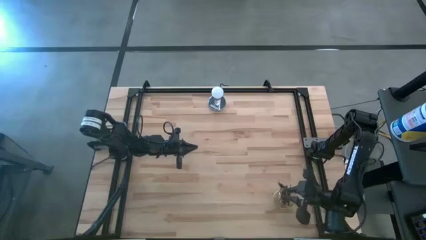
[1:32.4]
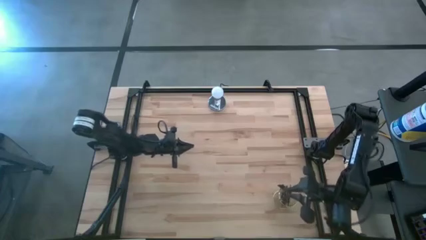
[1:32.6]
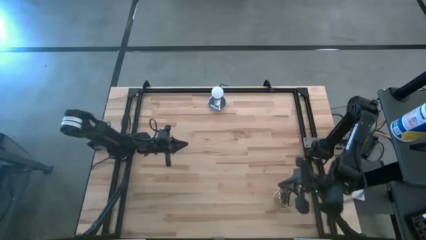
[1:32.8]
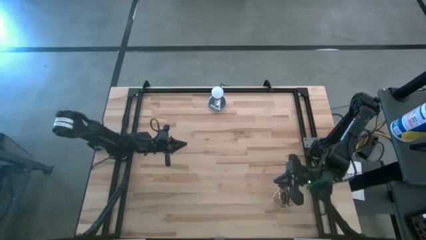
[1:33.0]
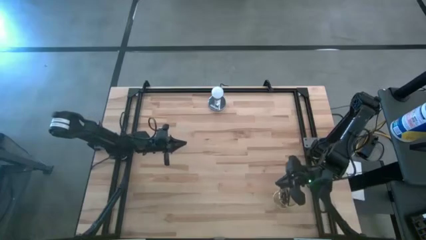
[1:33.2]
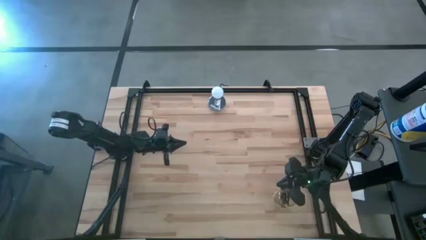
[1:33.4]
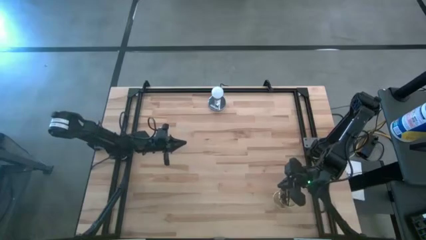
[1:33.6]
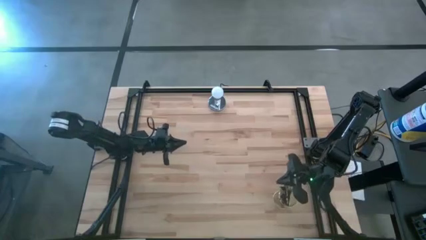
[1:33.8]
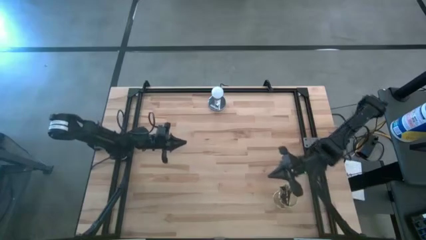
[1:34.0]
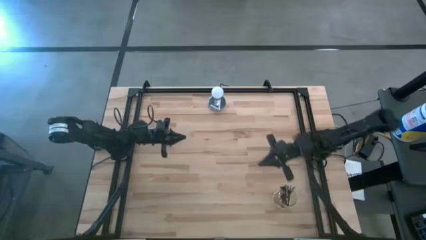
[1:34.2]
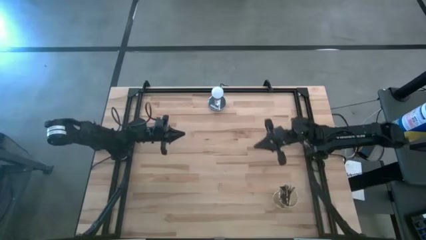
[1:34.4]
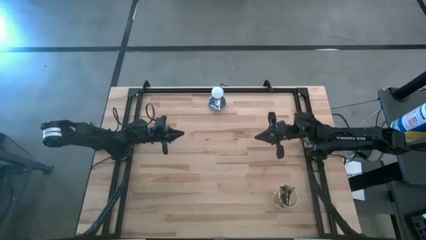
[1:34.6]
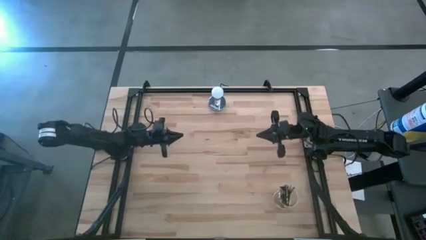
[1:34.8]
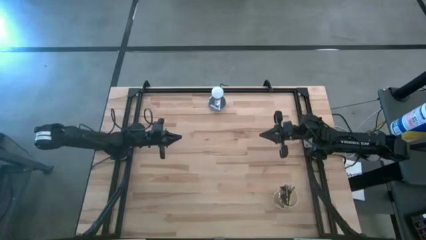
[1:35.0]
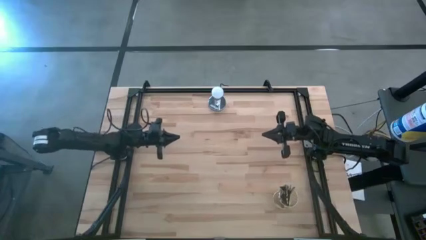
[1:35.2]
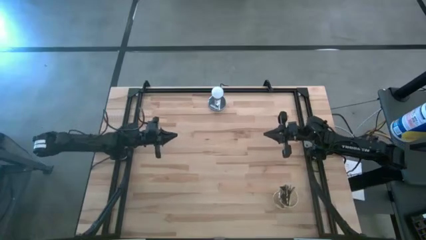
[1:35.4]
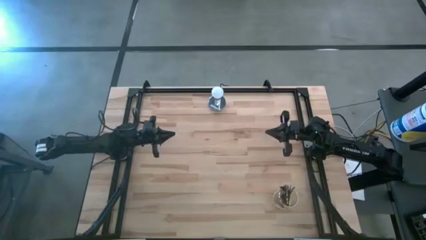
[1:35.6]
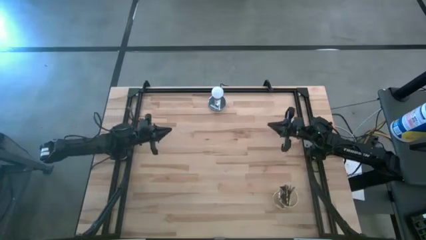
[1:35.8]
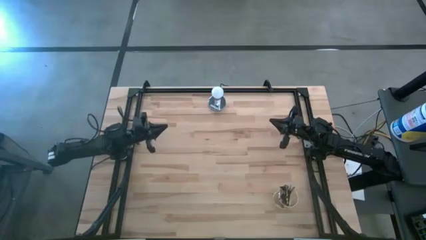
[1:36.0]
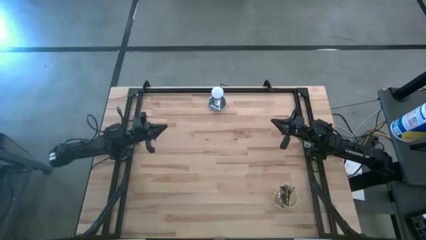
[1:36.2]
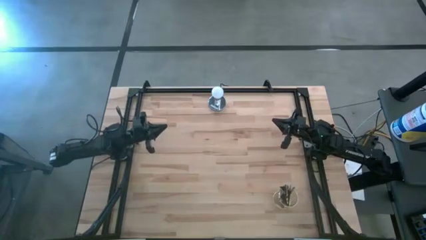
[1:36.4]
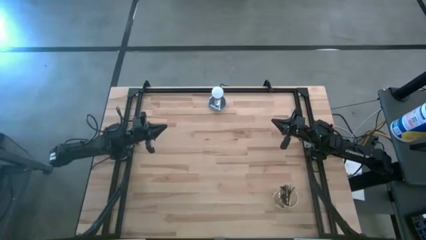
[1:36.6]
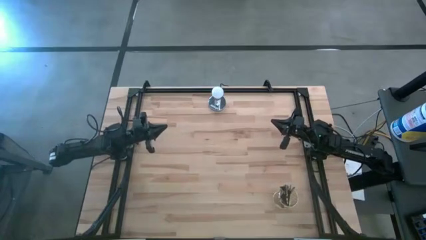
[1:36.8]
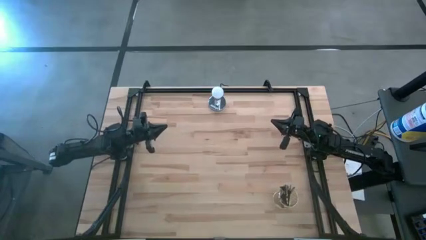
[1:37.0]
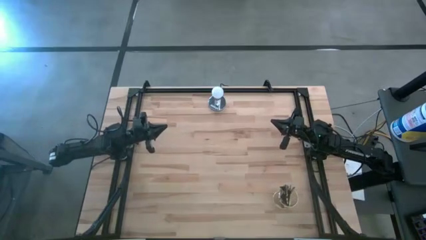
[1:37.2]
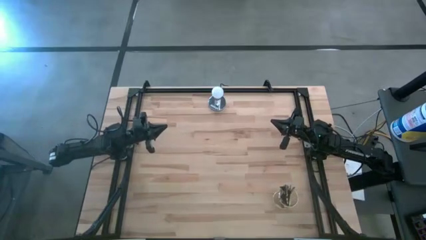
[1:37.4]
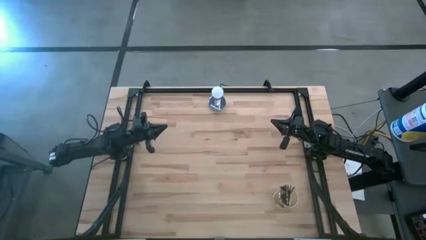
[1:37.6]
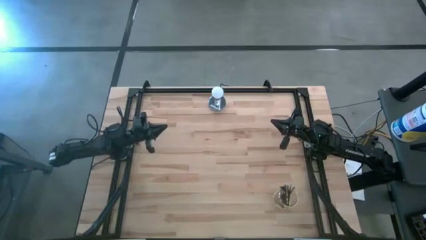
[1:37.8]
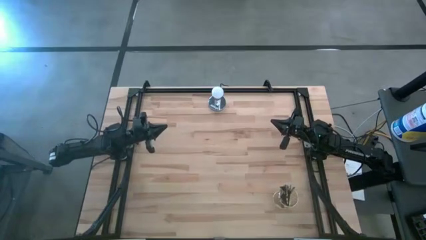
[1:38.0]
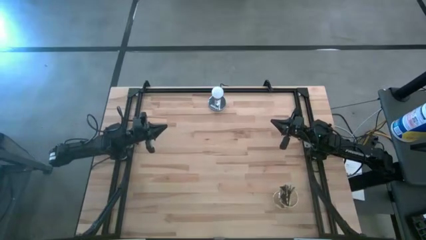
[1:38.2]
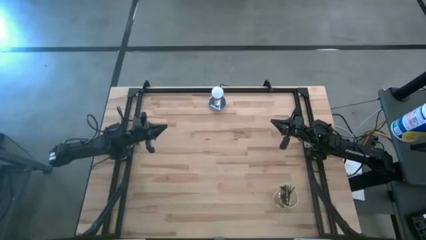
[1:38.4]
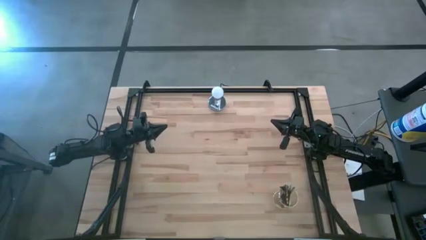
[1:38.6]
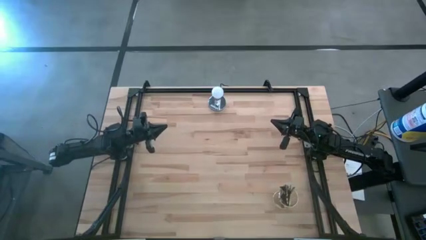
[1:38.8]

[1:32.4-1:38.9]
Task: Pick & Place Makeup Supplies
Return to Home Position

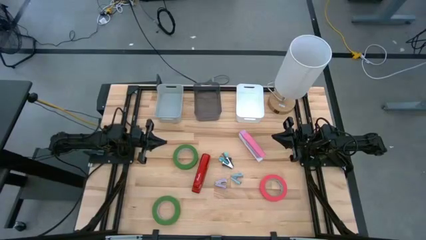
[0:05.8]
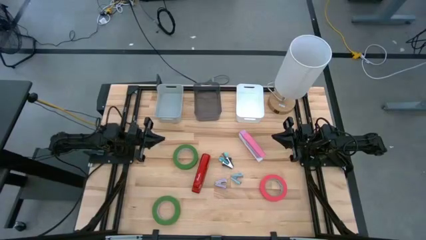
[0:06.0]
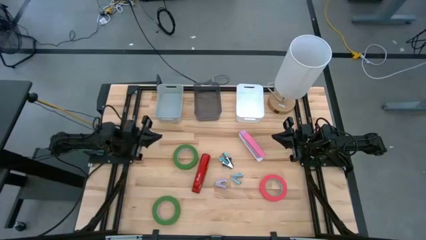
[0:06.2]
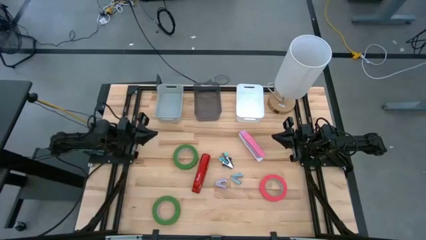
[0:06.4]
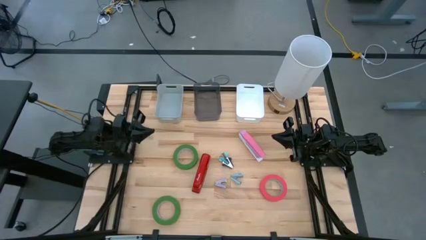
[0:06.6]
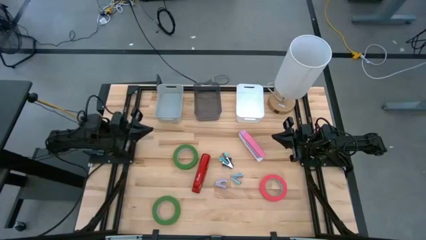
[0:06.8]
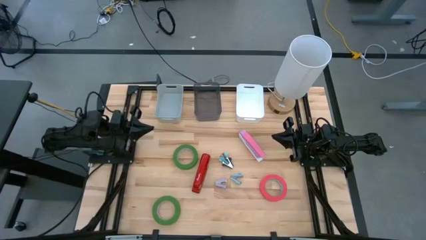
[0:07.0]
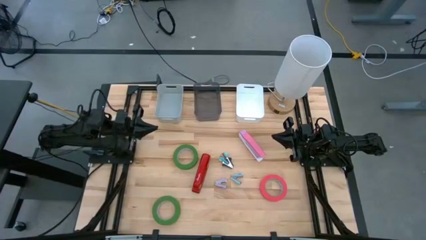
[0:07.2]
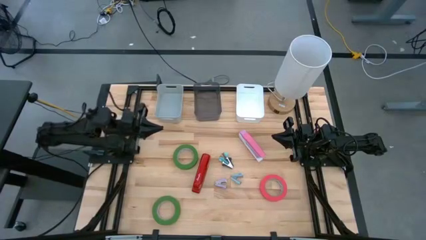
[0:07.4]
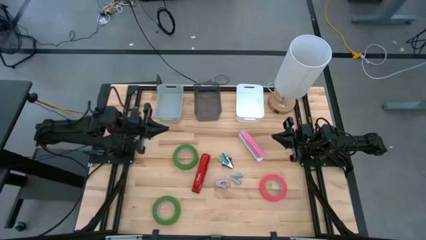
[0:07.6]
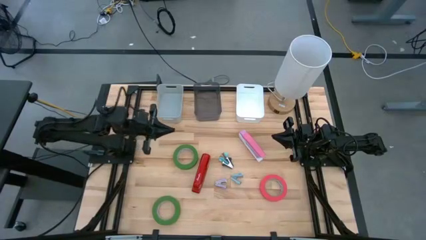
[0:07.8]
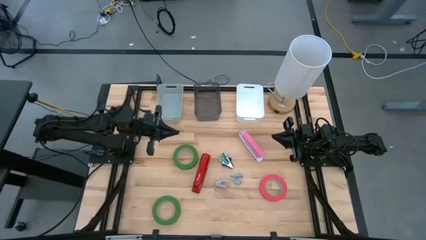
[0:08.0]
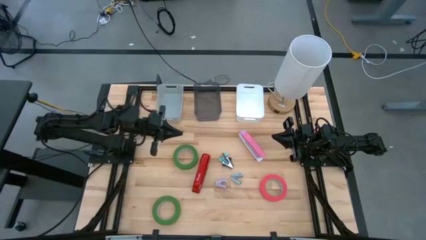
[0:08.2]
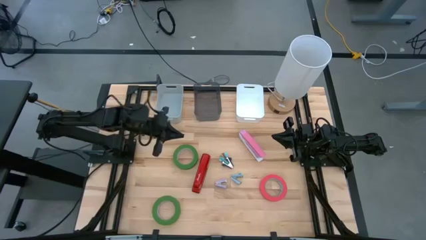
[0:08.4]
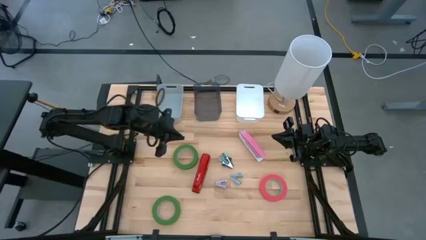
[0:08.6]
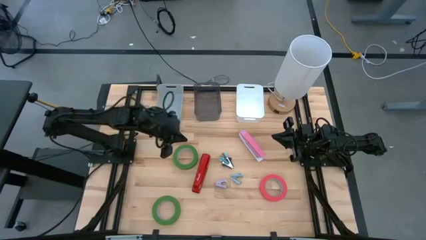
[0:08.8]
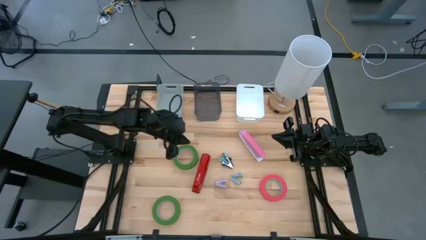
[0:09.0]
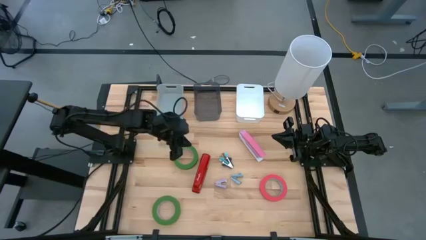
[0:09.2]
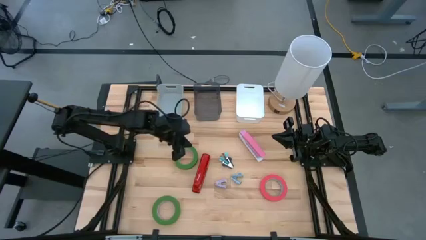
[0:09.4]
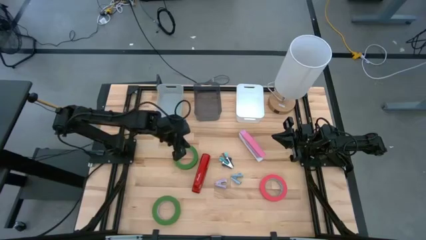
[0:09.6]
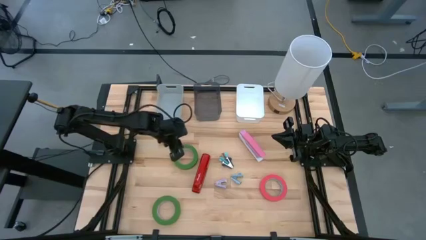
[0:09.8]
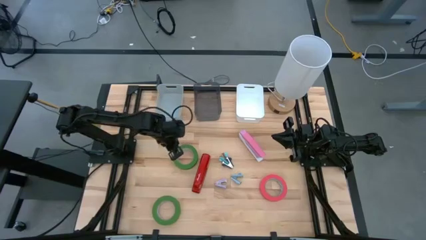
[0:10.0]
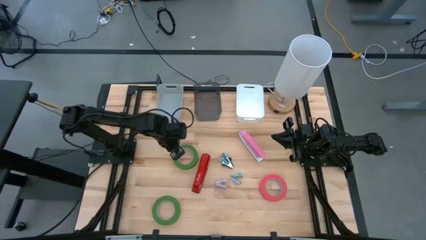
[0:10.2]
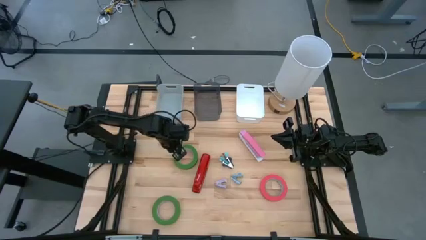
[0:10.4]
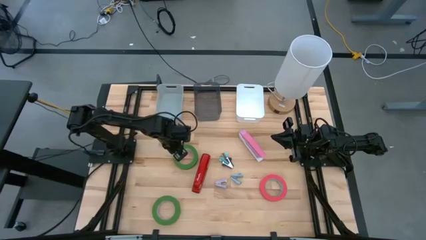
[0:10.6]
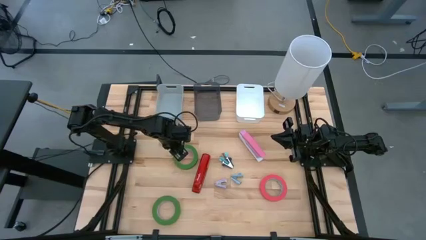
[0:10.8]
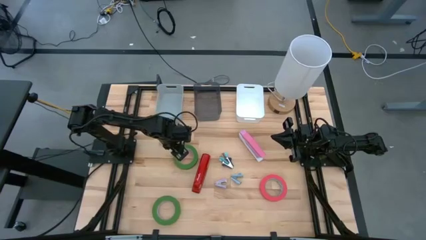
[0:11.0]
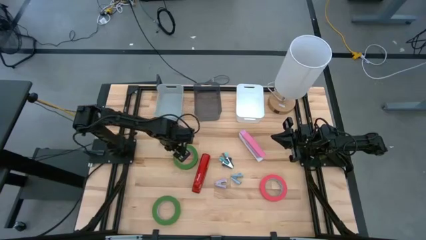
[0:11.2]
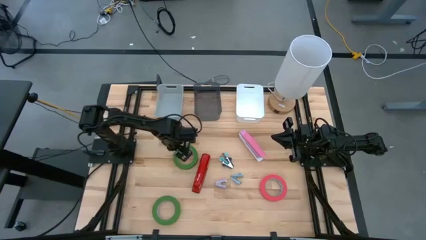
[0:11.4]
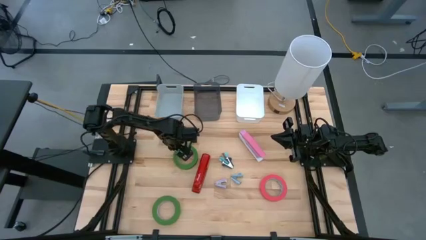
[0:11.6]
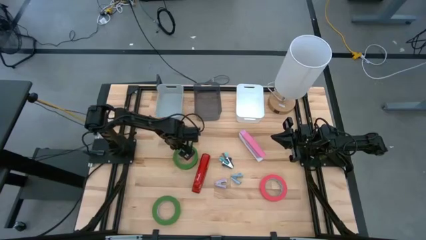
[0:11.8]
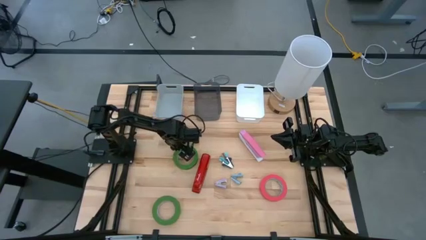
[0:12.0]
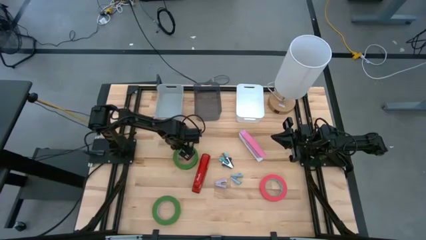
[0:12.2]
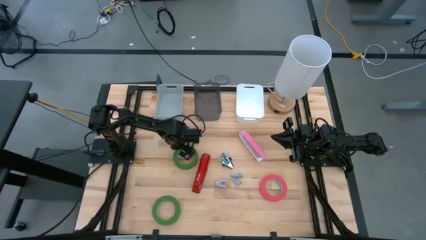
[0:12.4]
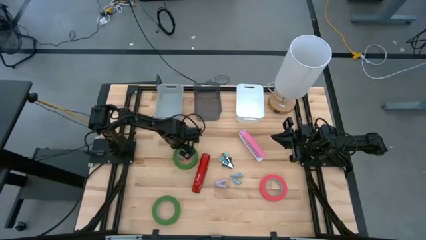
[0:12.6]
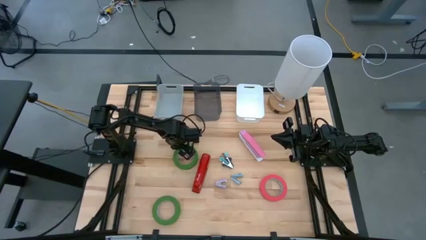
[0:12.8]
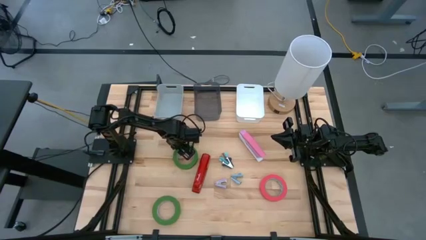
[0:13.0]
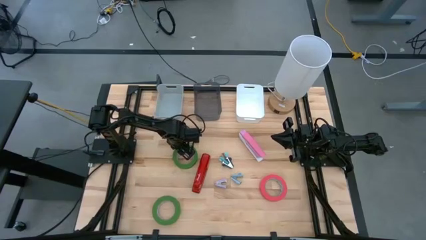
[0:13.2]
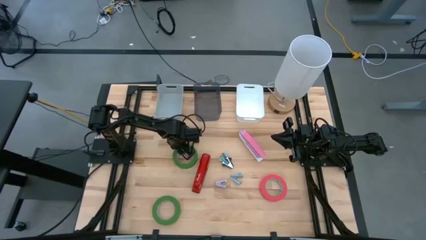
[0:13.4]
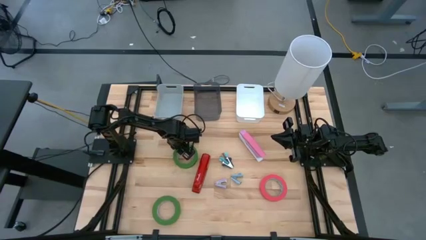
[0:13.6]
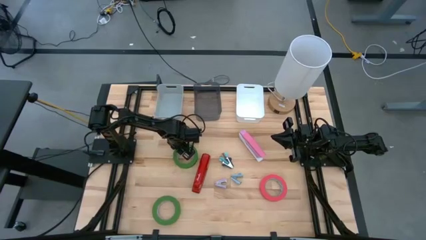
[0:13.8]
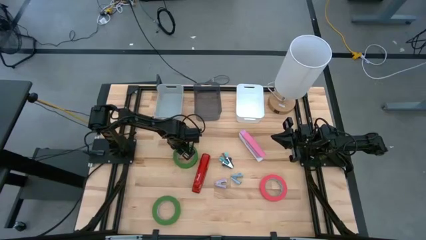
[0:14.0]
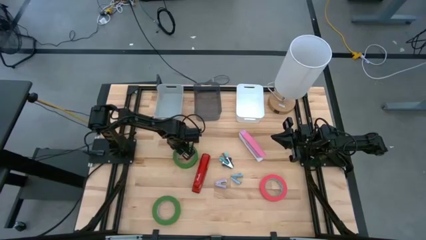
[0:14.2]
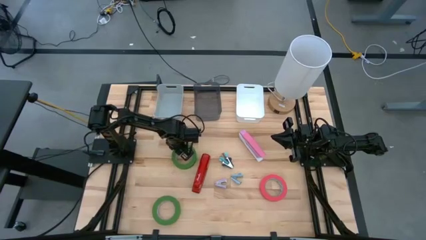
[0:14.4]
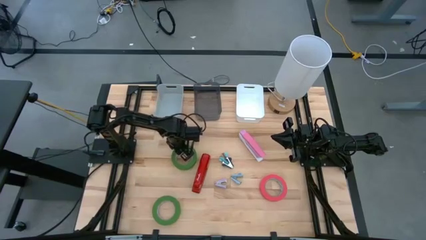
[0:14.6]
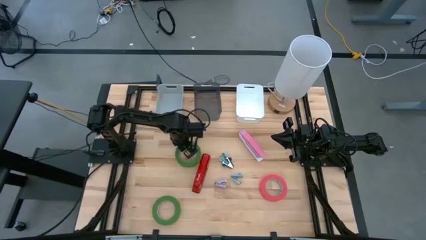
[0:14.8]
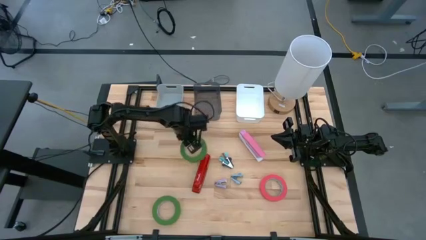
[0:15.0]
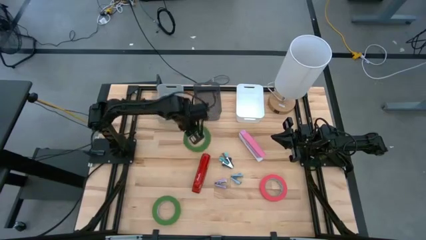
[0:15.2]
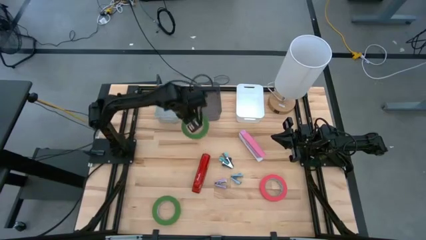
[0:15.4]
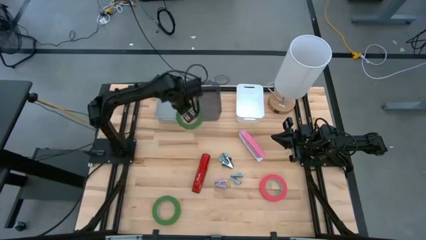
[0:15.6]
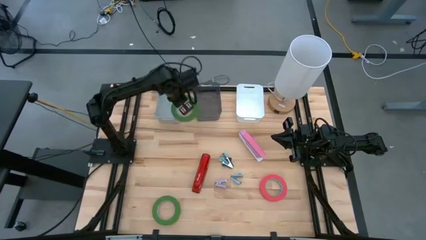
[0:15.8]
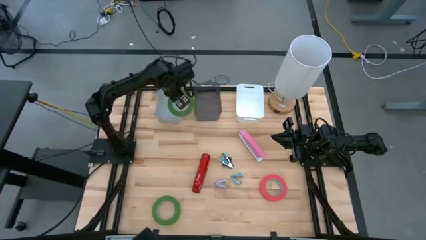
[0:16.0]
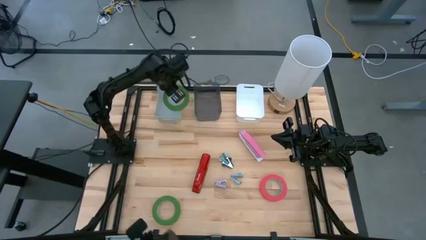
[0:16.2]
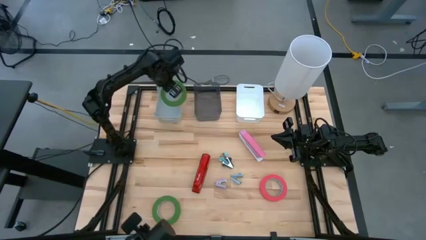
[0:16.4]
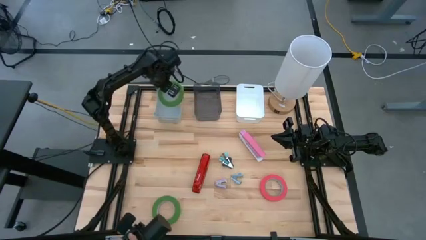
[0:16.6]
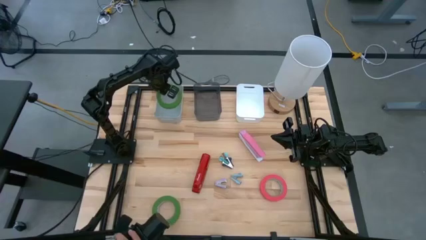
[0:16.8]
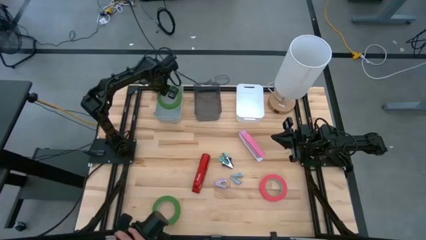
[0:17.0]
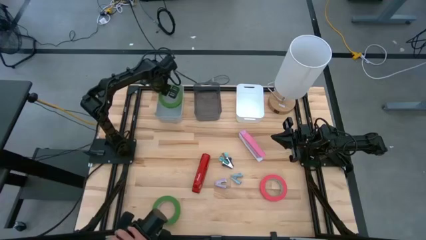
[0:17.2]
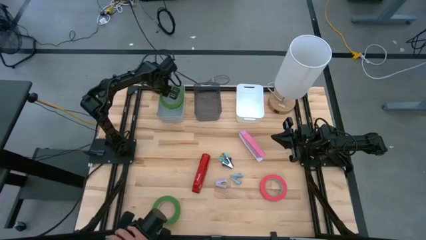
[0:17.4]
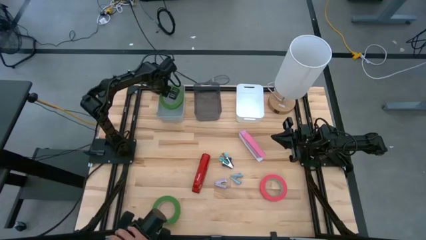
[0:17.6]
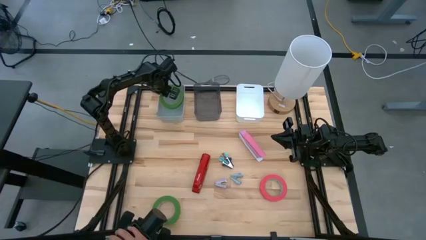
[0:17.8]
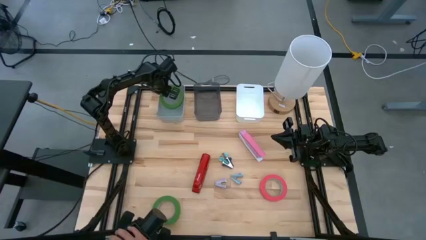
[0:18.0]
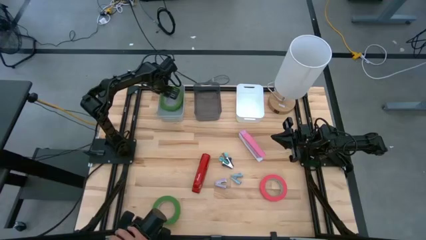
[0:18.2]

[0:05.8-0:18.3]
Task: Pick and place Stapler, Stapler remover, tape
Put the top green tape into the gray bin
